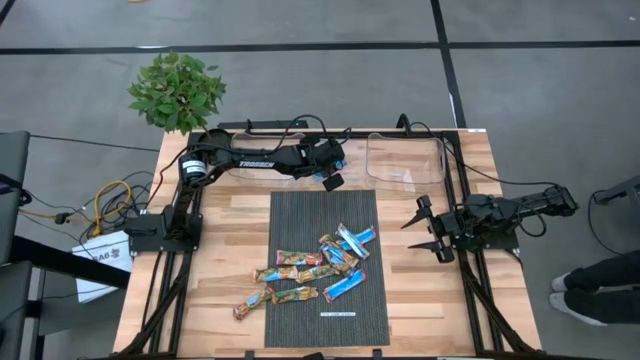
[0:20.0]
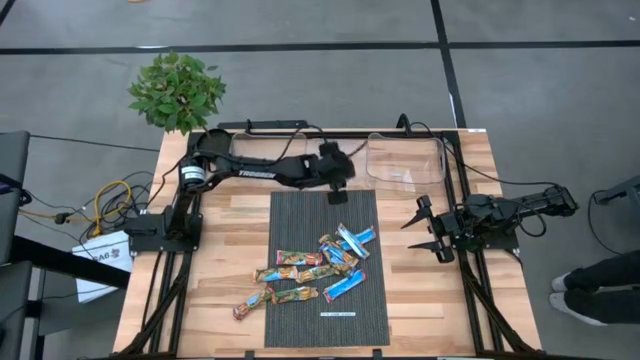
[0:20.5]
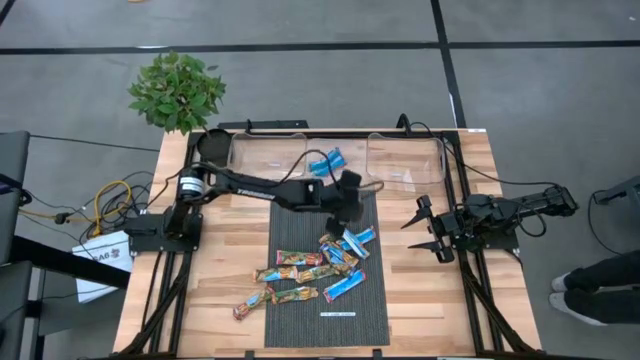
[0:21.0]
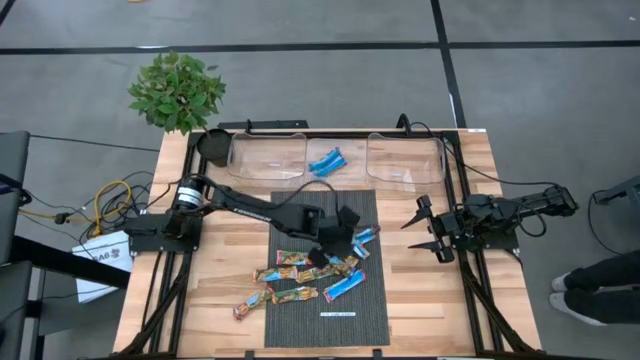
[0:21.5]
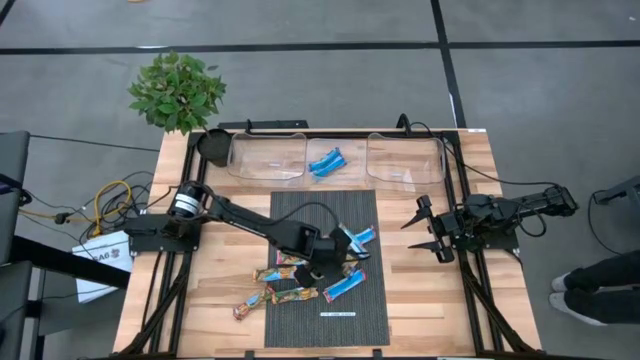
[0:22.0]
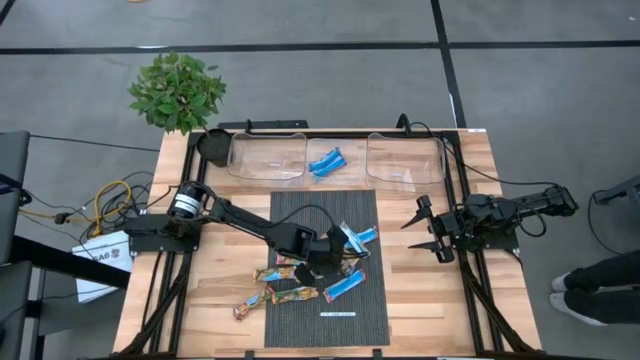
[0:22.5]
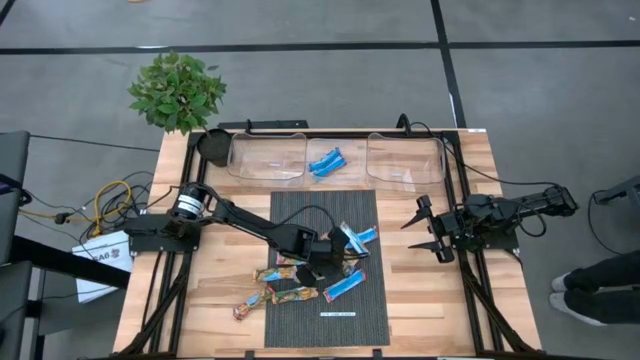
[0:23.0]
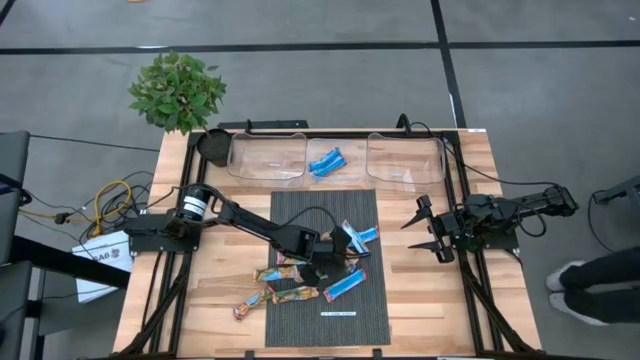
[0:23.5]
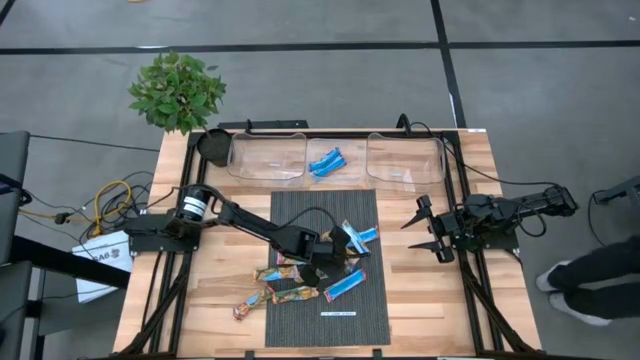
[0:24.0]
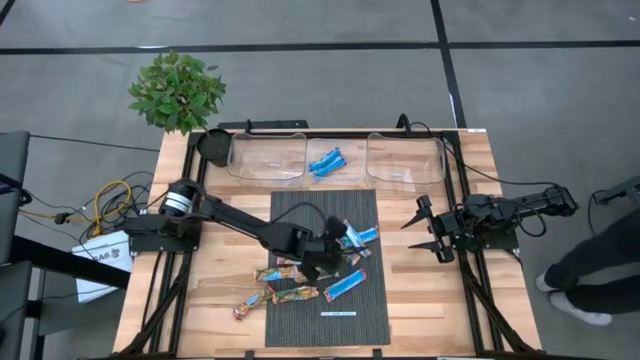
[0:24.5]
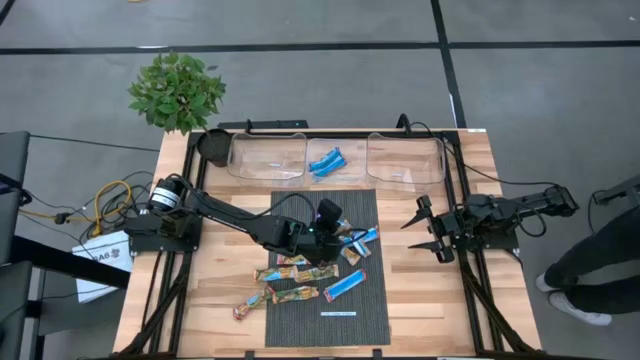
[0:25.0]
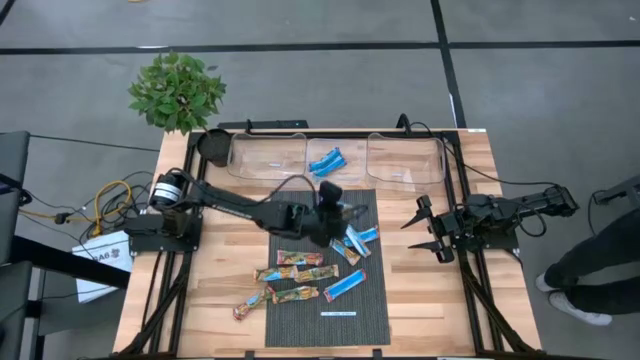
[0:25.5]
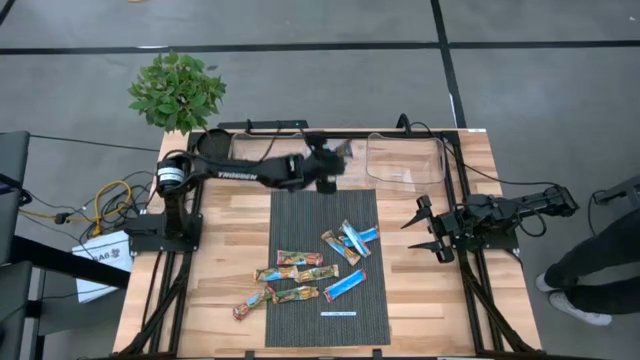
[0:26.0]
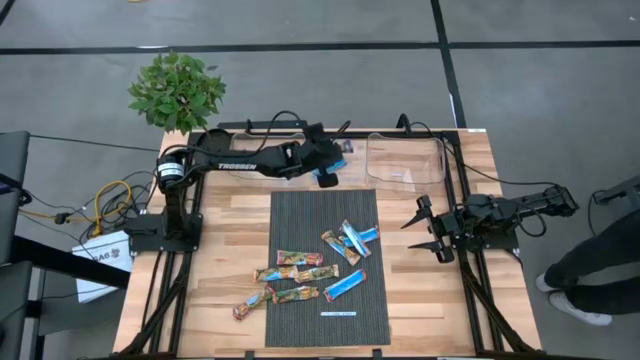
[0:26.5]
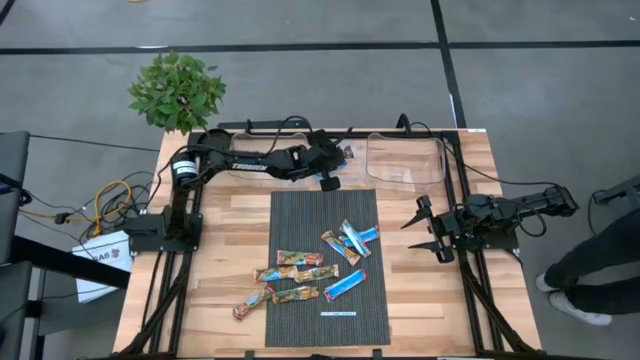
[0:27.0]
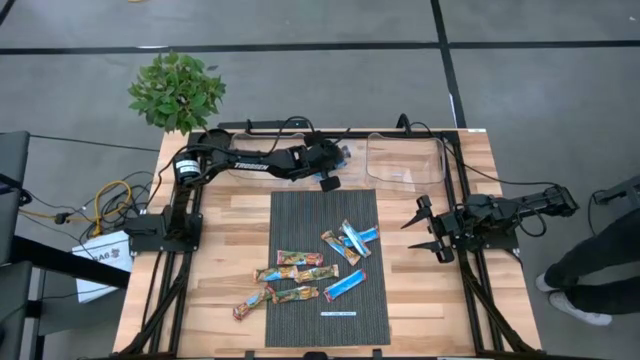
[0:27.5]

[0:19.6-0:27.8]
Task: Pick and place Granola Bars by type
Put the blue granola bar into the white bin

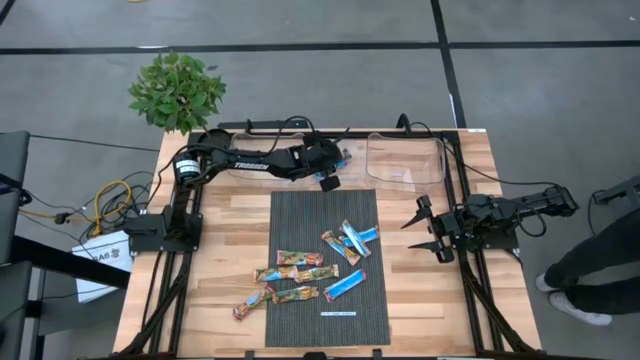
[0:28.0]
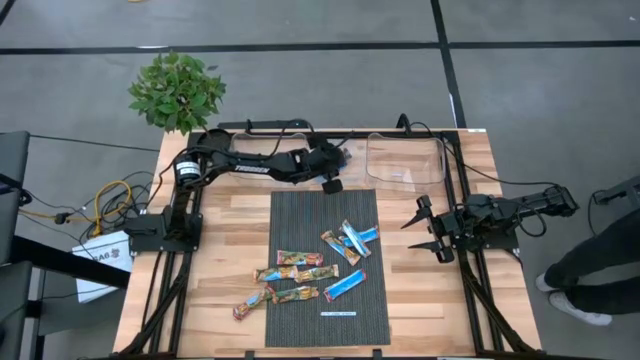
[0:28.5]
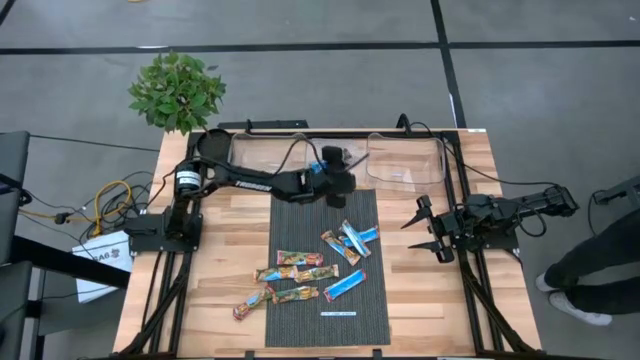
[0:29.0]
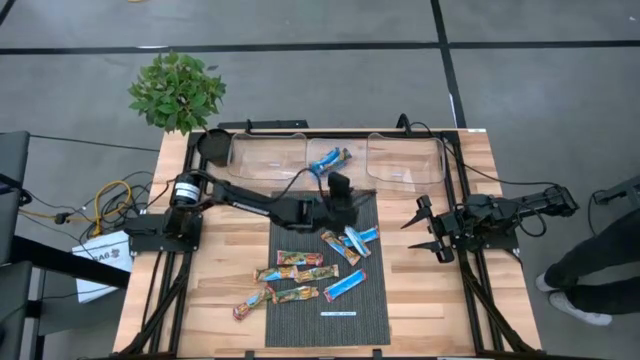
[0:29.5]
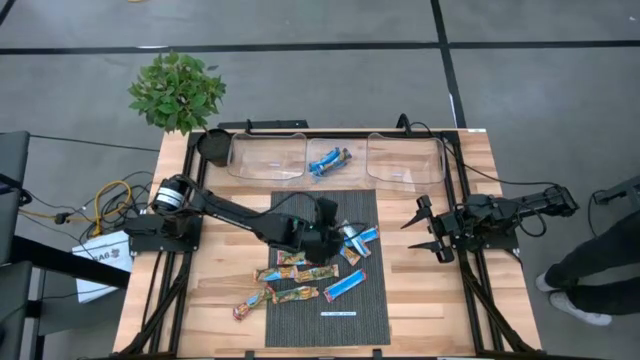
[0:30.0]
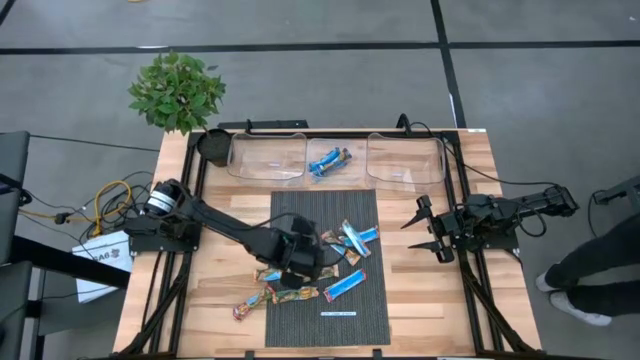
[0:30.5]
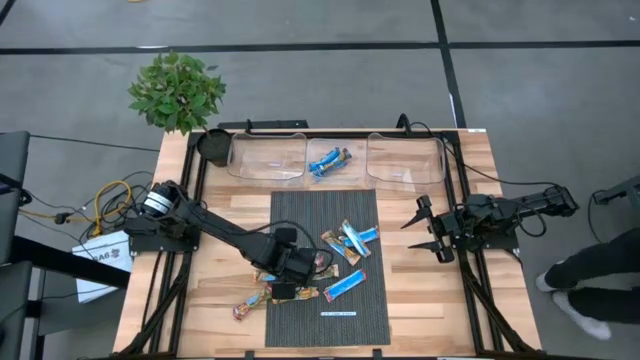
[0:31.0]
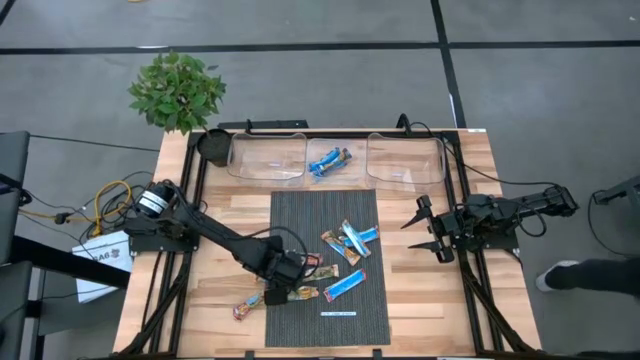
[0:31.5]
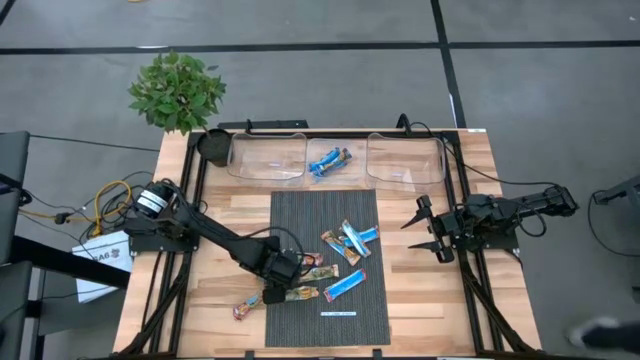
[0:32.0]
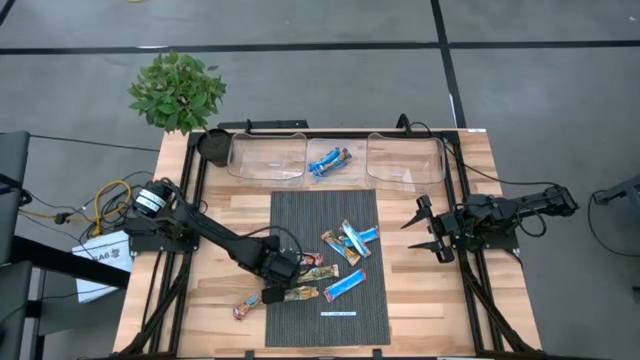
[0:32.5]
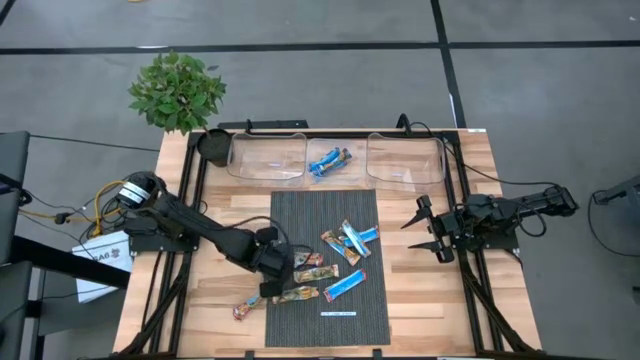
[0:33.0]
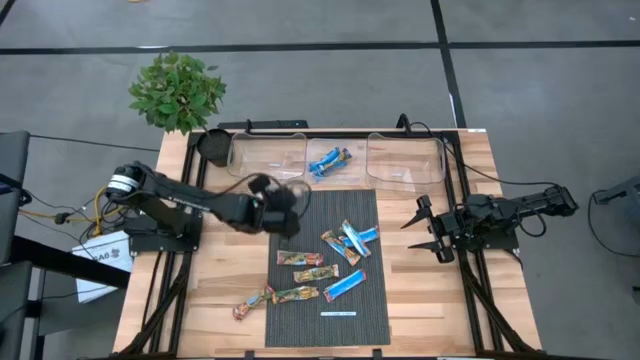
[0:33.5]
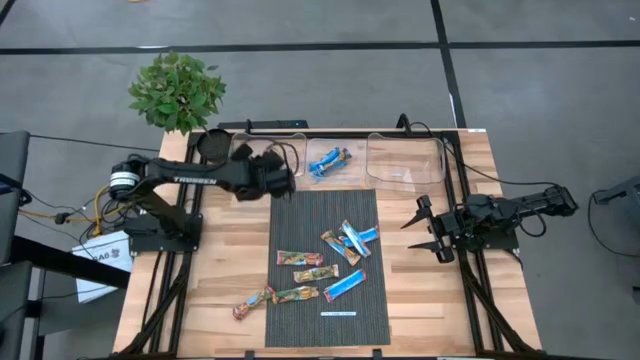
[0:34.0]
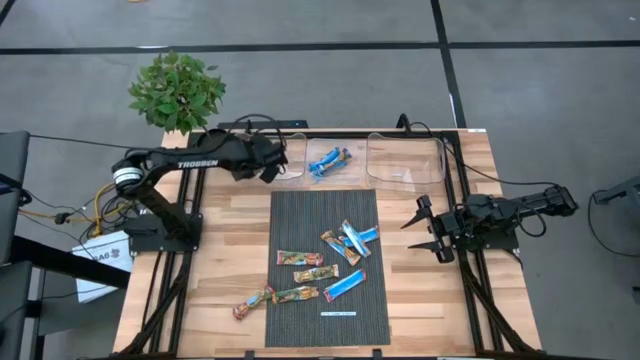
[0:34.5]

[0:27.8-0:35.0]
Put the yellow granola bar into the left transparent bin

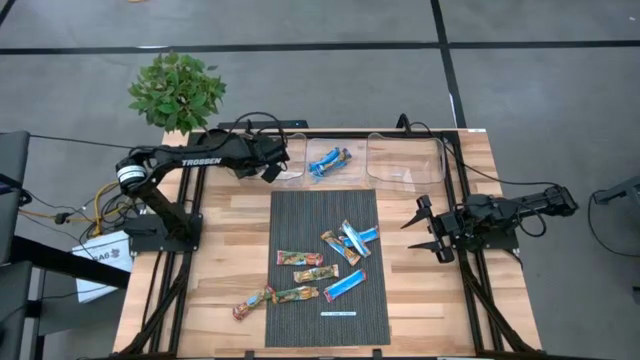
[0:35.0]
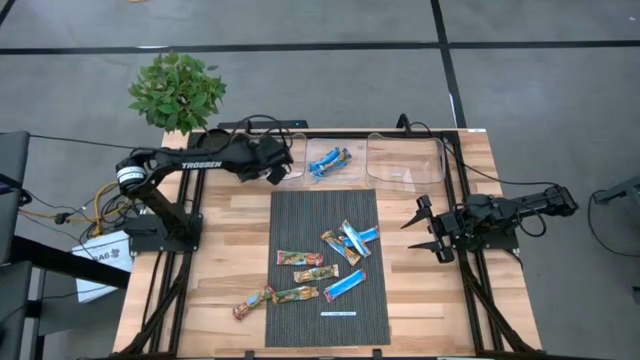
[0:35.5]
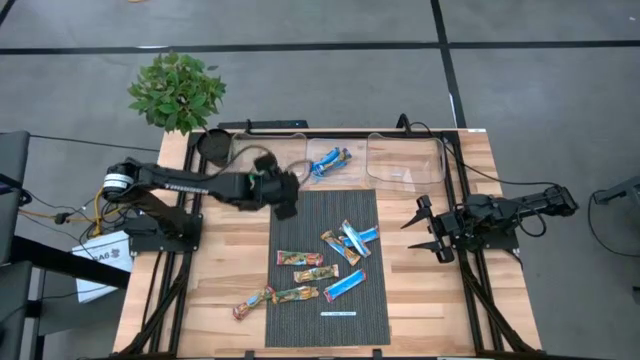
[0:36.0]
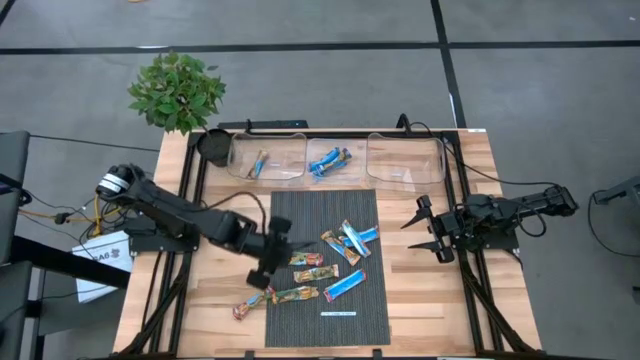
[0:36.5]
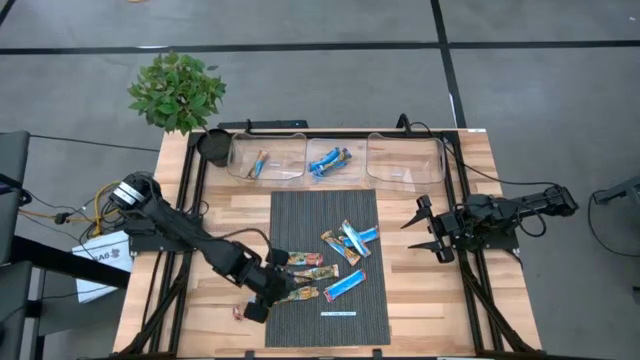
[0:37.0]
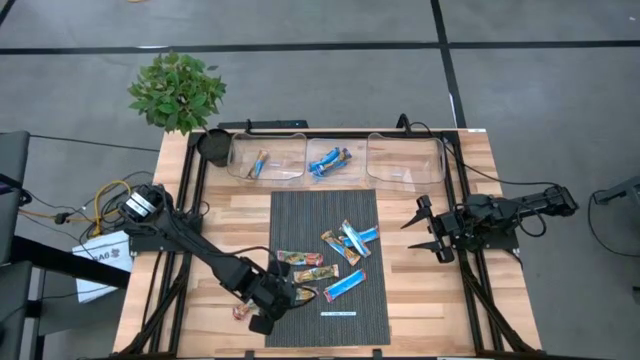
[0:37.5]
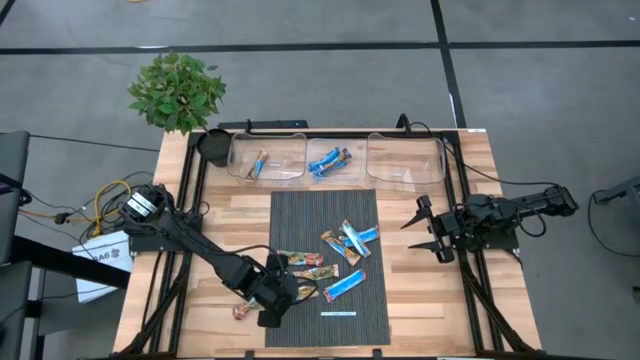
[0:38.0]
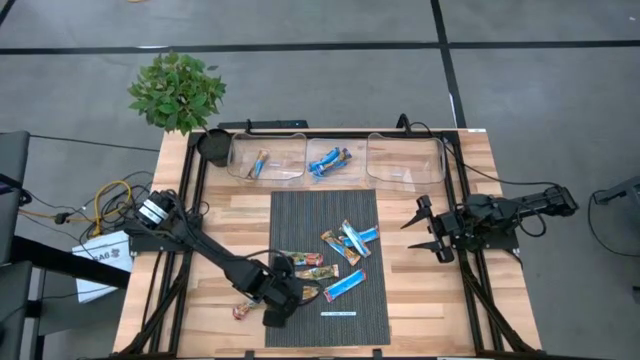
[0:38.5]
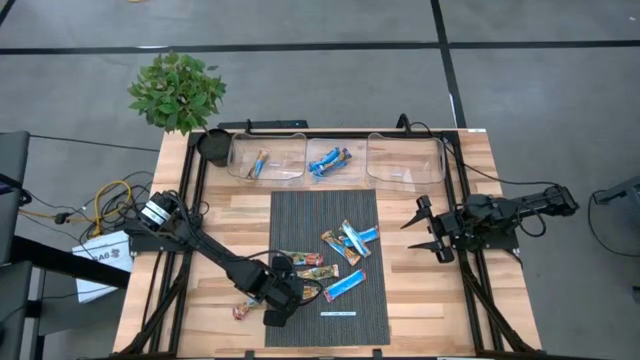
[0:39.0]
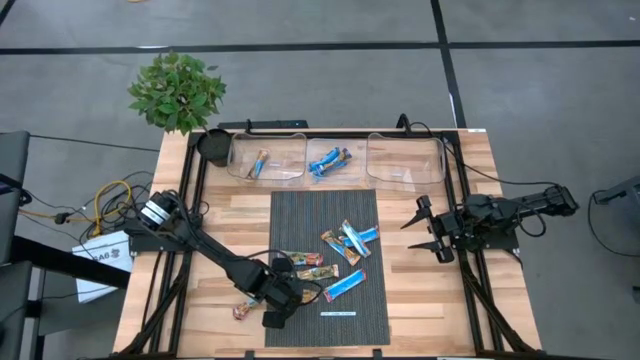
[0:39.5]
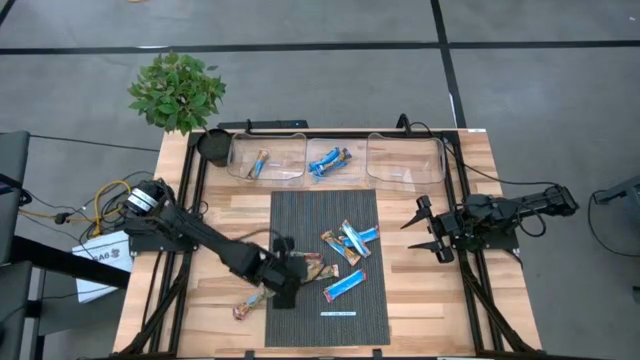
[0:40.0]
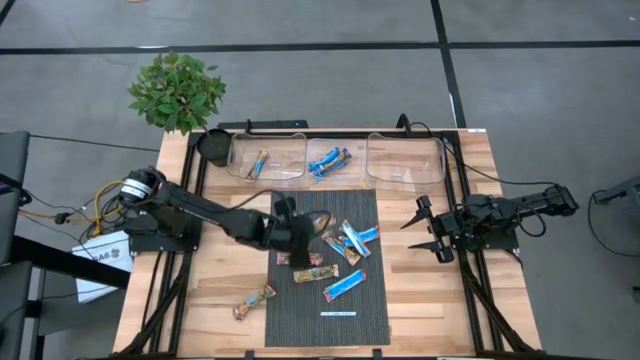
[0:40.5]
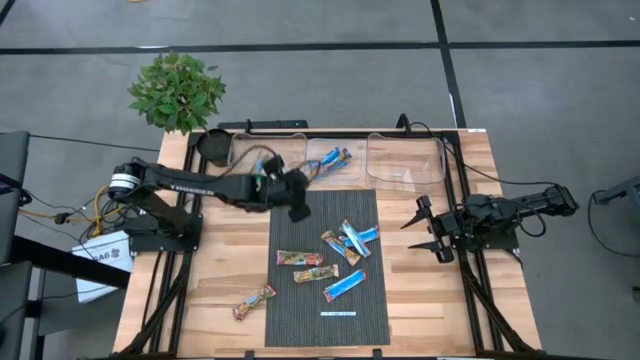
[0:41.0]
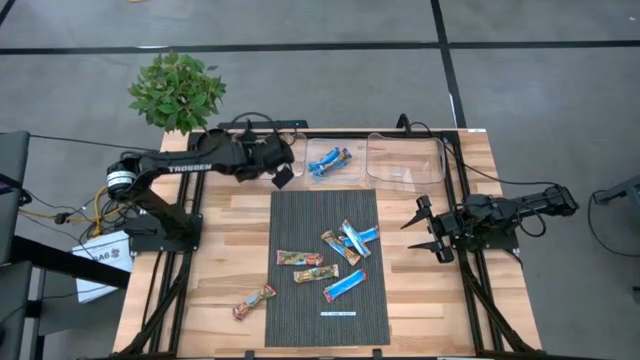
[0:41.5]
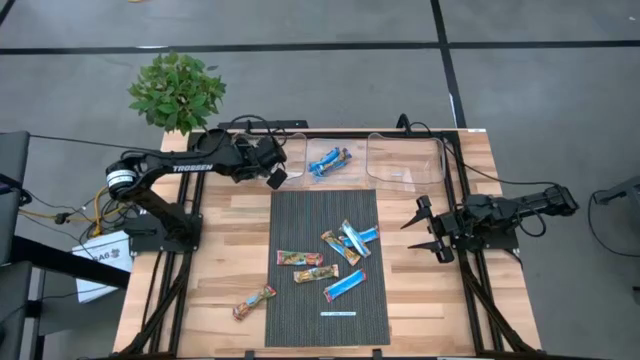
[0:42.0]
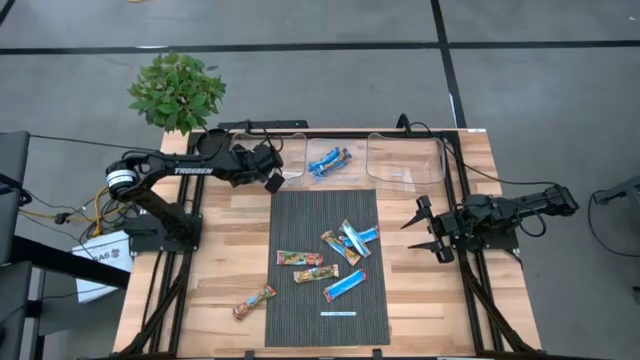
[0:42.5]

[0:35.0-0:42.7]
Put the yellow granola bar into the left transparent bin
